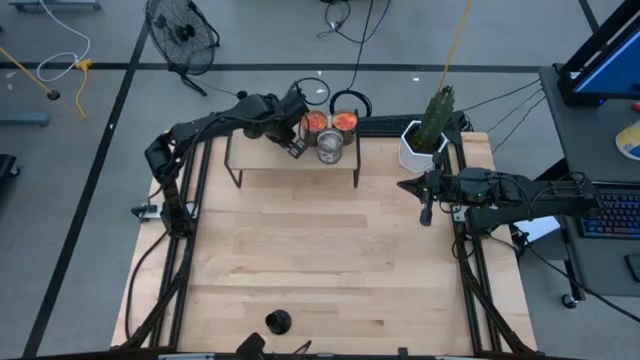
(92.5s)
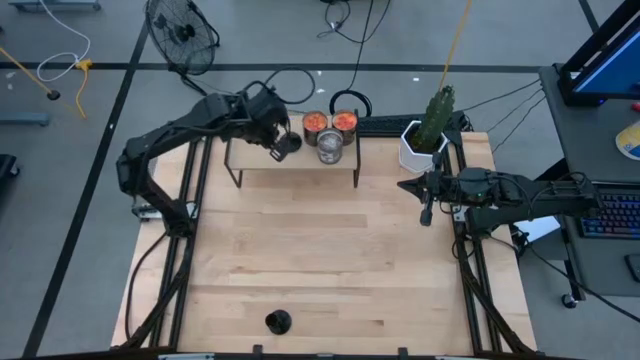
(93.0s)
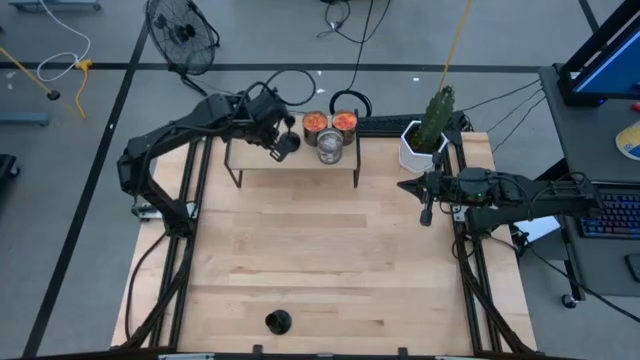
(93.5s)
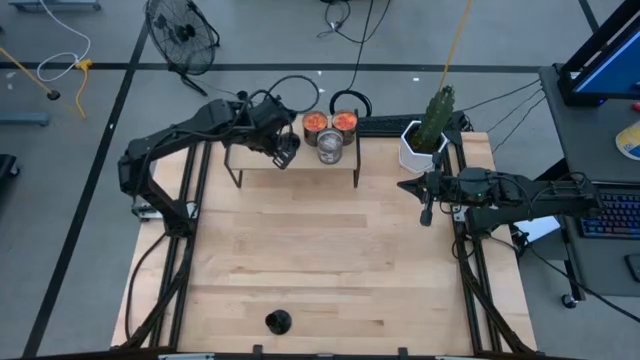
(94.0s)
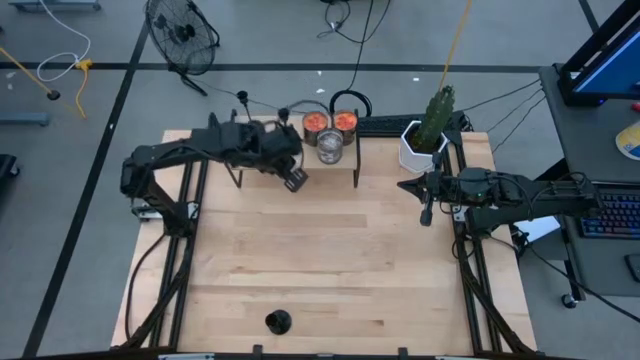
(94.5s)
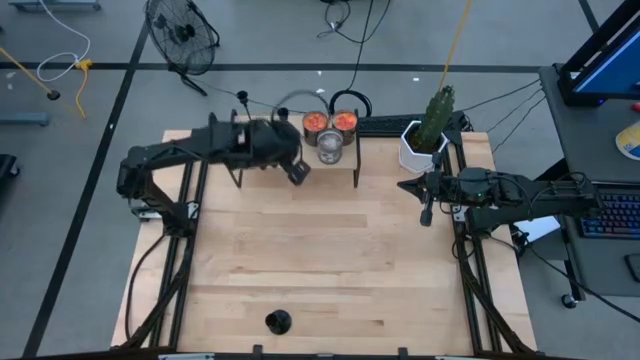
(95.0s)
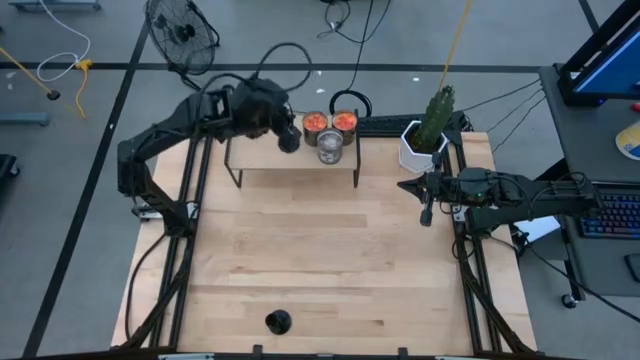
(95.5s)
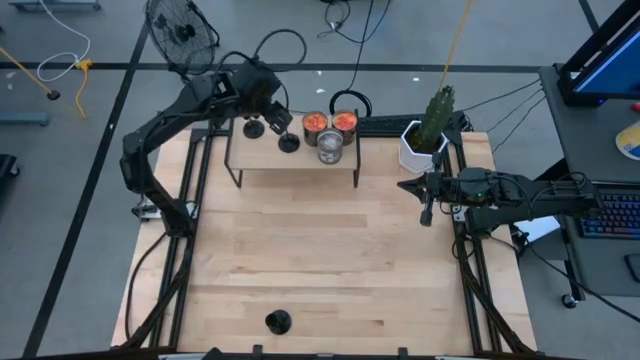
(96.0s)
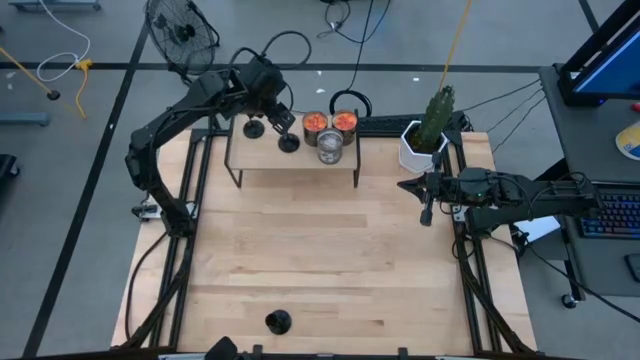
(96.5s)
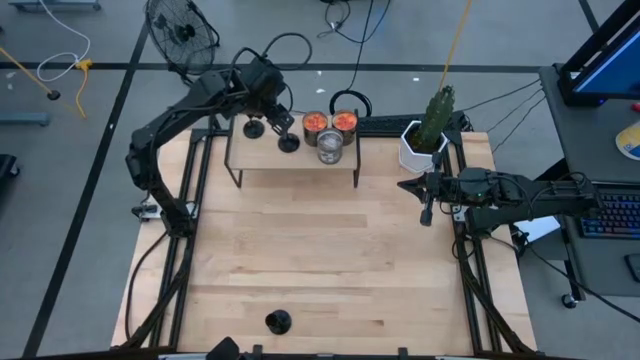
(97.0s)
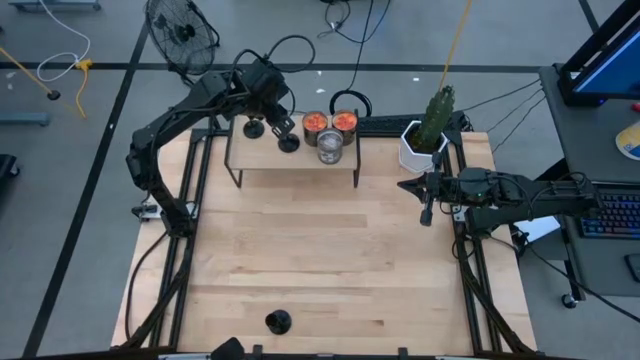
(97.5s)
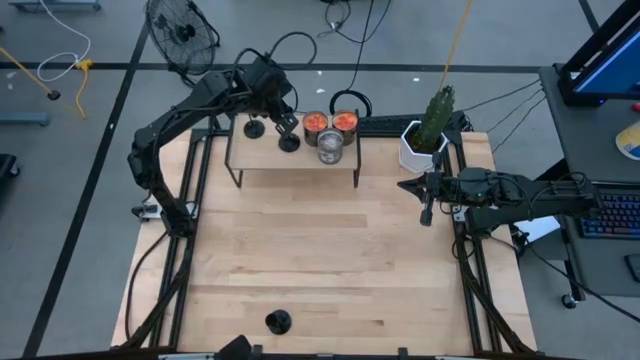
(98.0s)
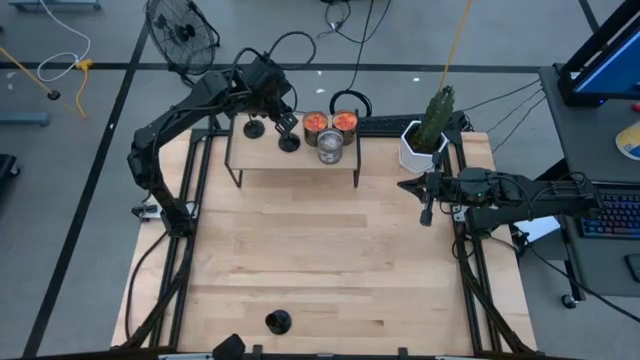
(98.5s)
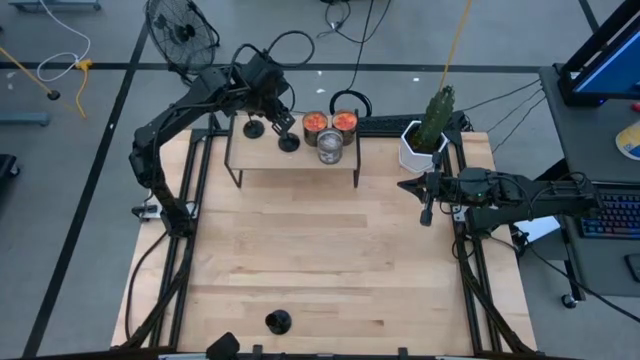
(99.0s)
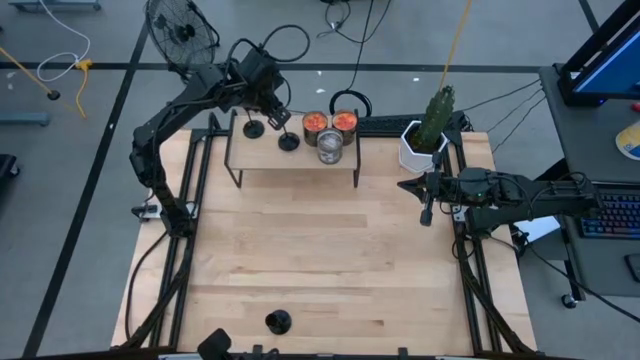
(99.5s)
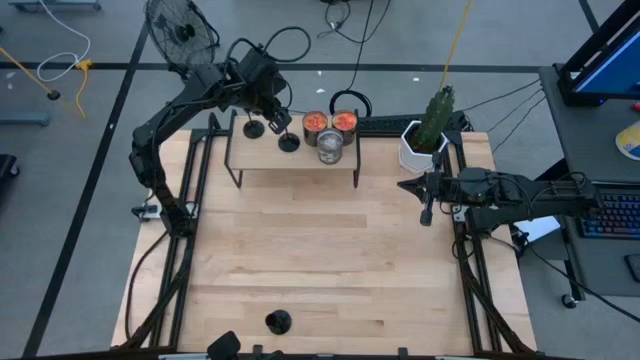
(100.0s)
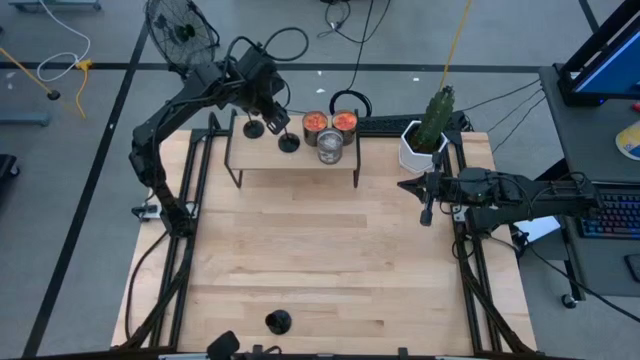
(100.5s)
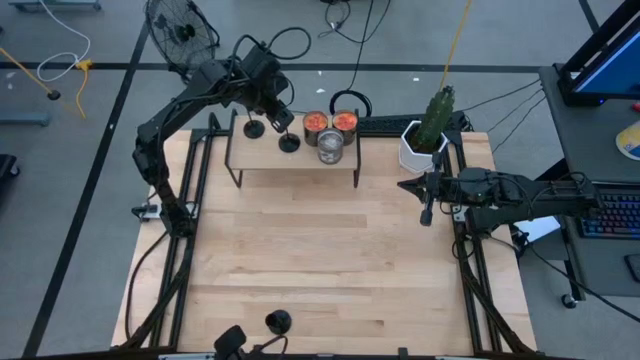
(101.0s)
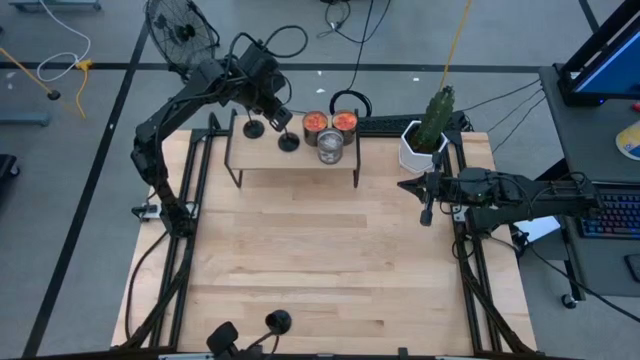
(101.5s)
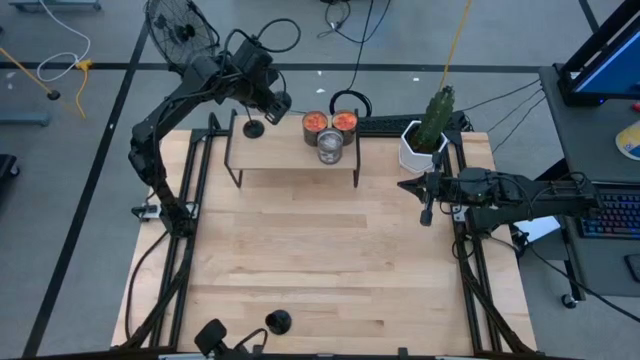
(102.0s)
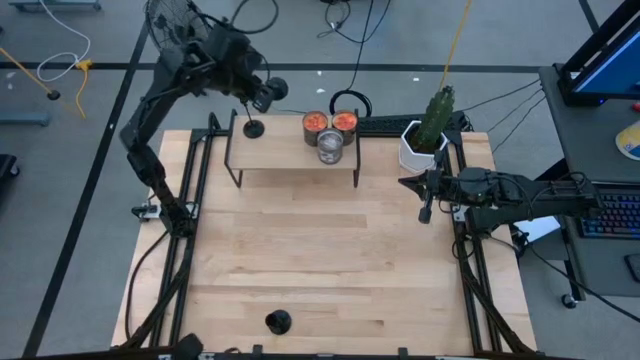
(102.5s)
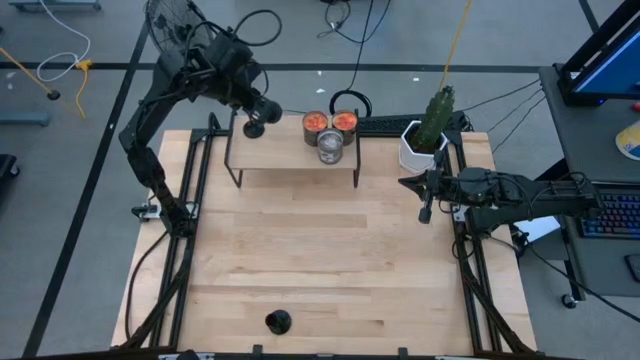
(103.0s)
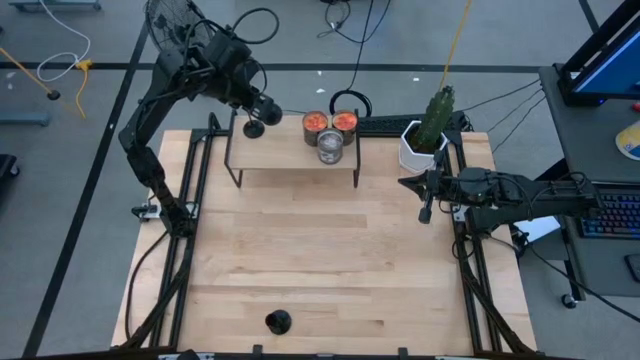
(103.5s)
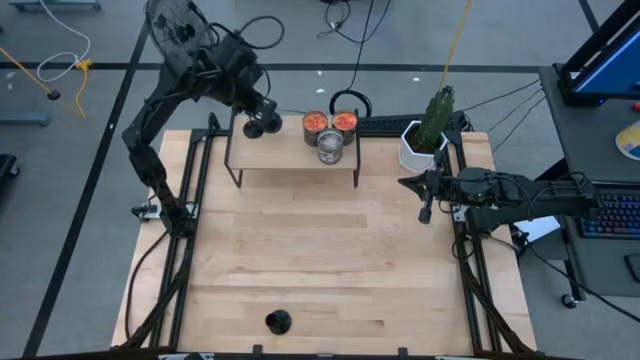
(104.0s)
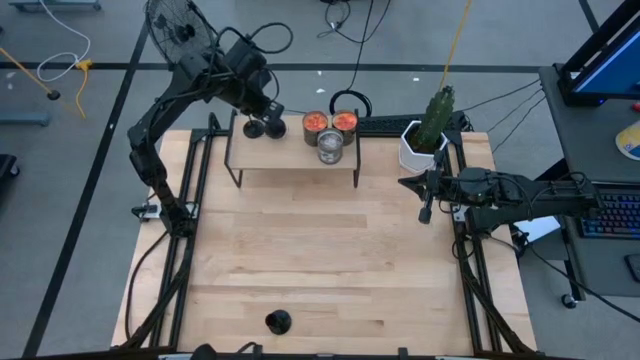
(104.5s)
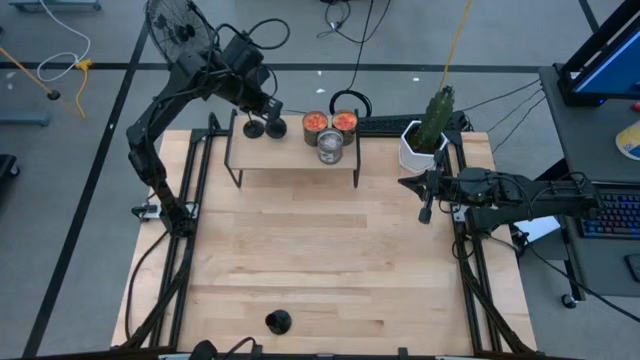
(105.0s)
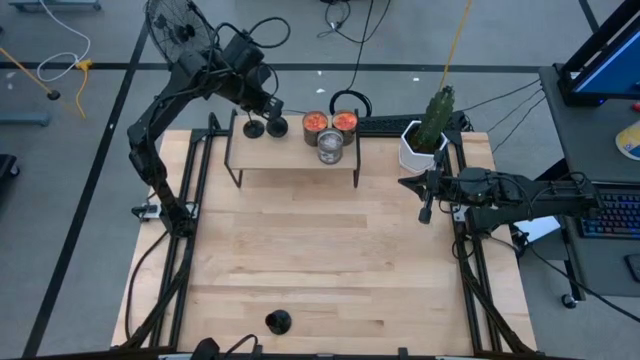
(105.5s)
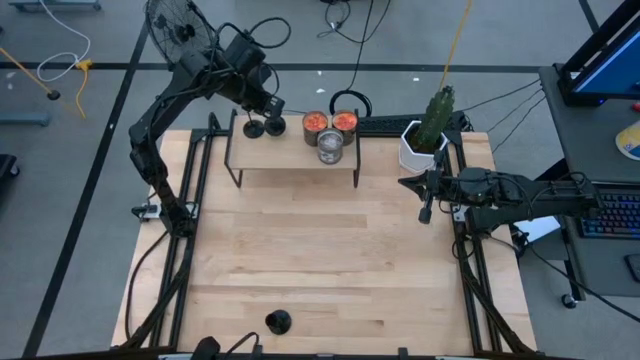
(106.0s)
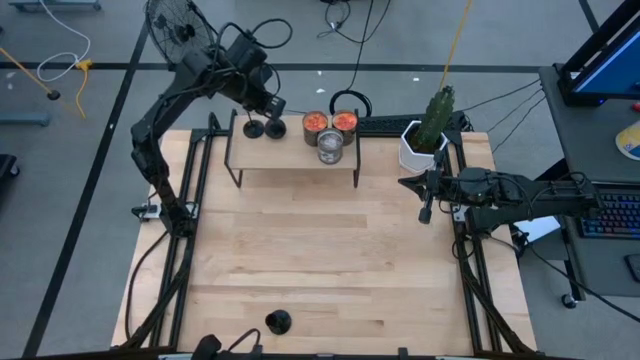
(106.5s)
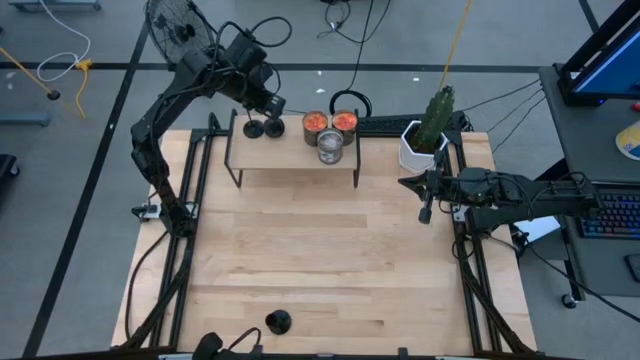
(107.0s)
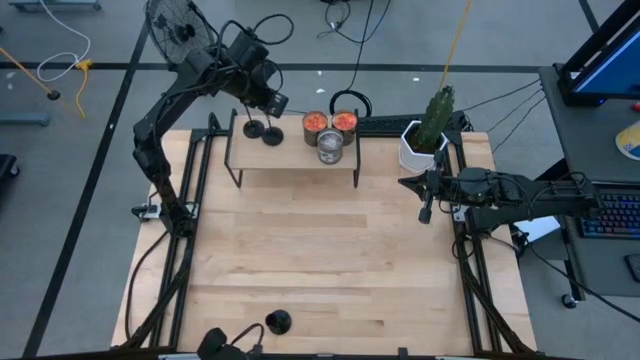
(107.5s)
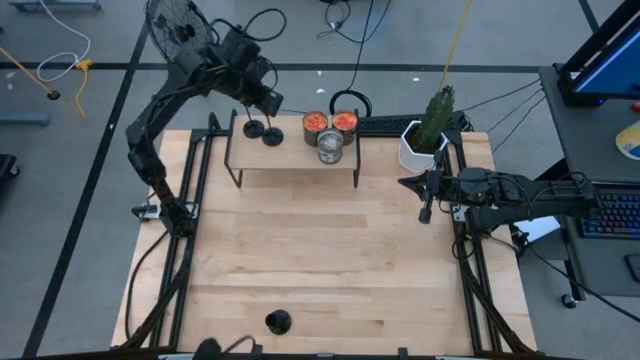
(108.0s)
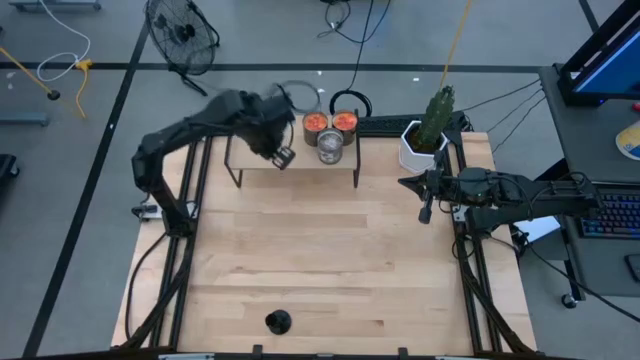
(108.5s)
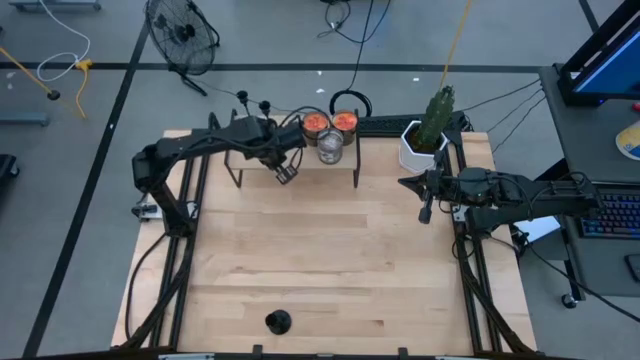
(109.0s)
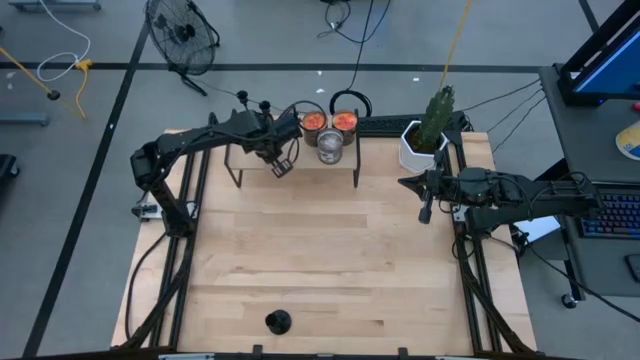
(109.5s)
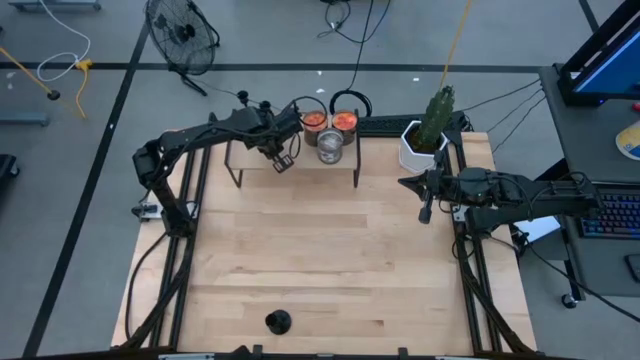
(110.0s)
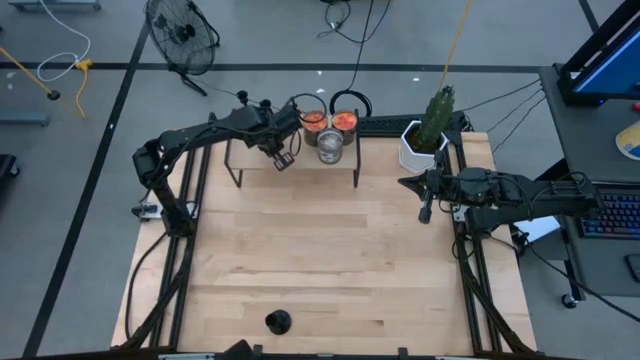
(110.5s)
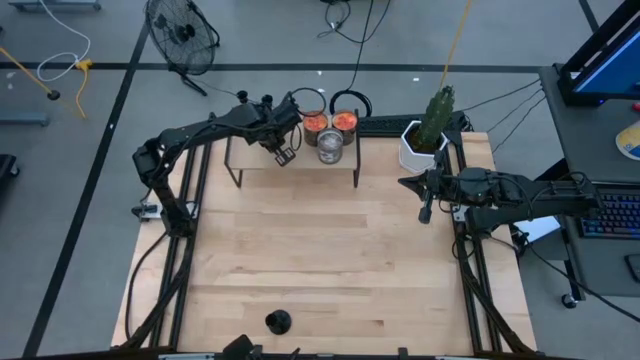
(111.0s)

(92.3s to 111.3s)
Task: Pick & Place candle stick holders
Put the top black candle holder on the shelf

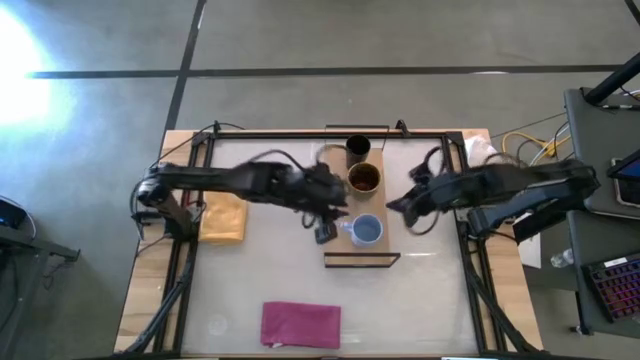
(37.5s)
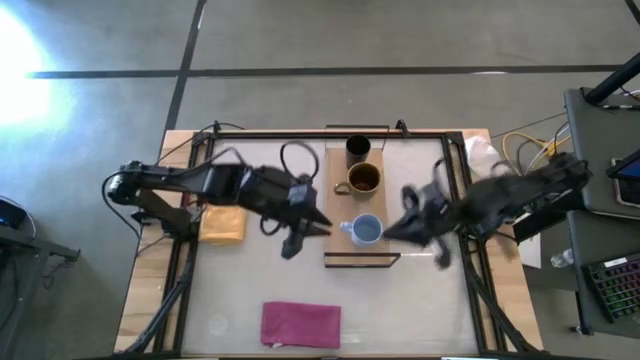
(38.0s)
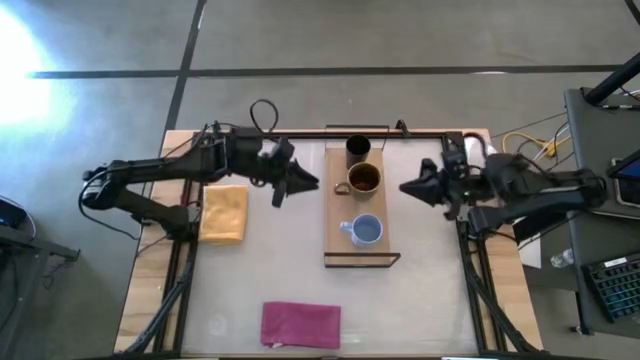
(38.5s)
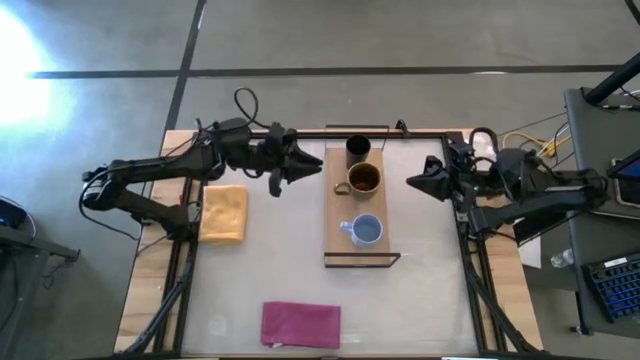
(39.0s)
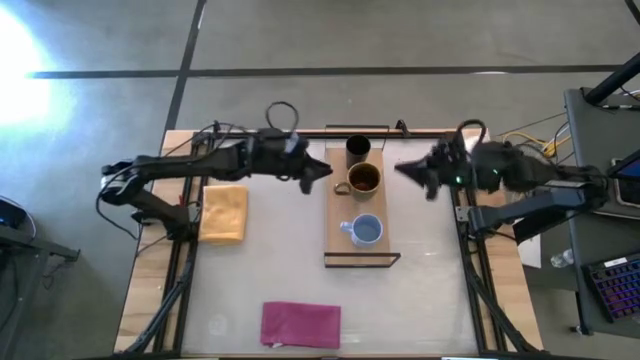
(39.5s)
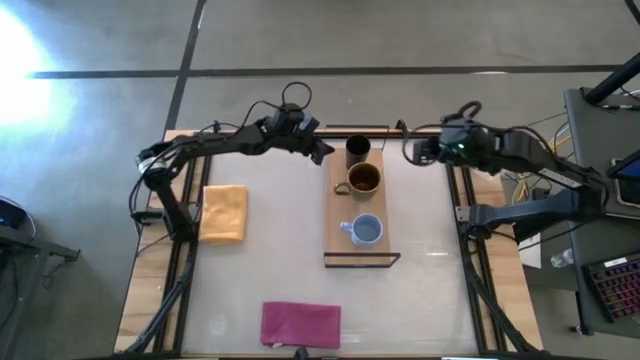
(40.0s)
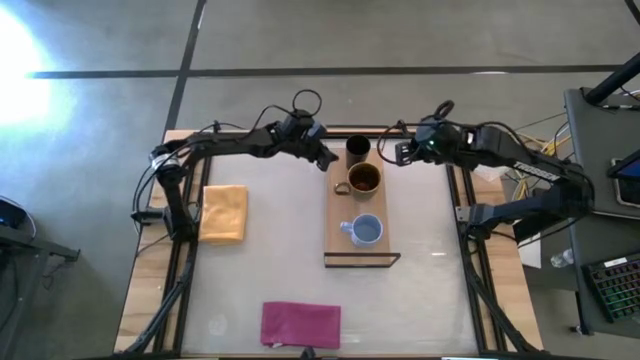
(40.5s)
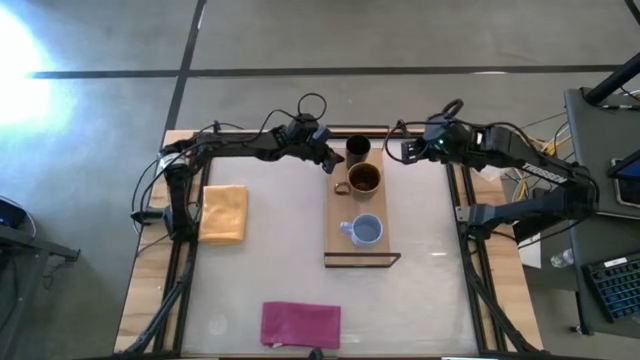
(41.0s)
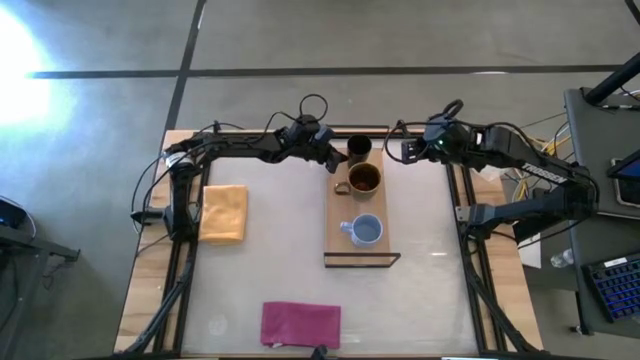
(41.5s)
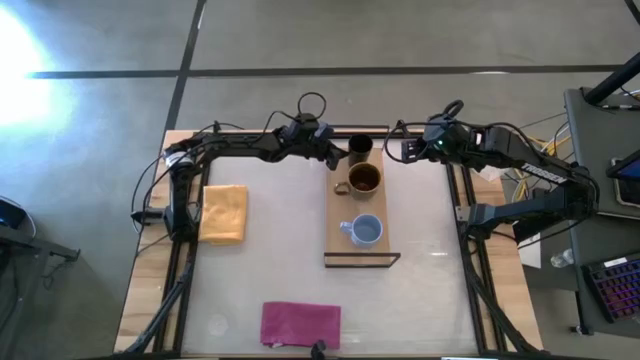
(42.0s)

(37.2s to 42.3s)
Task: Stack small to large cups/mugs on shelf
Adjust the black cup on the shelf
